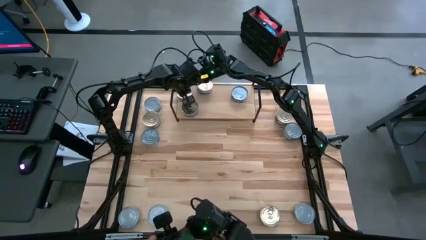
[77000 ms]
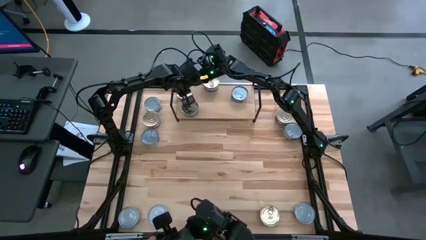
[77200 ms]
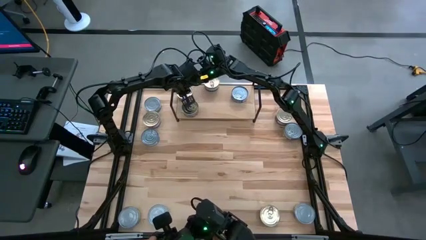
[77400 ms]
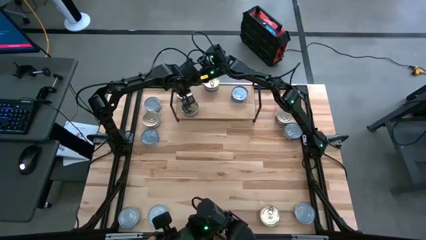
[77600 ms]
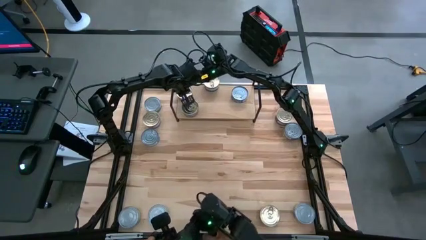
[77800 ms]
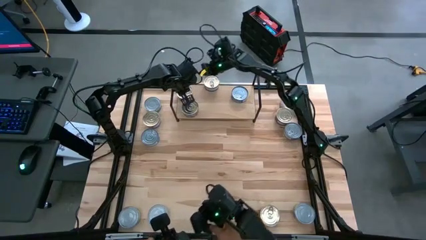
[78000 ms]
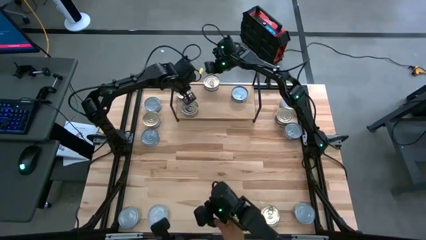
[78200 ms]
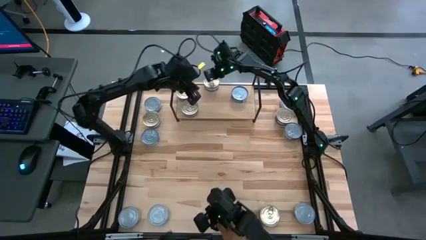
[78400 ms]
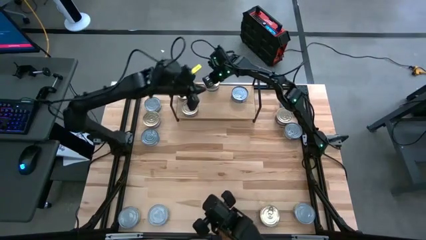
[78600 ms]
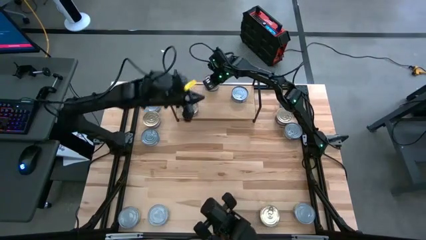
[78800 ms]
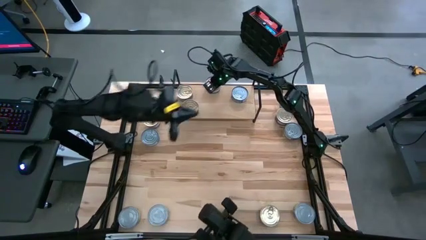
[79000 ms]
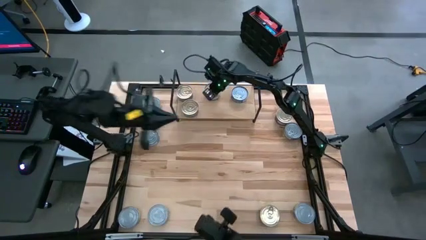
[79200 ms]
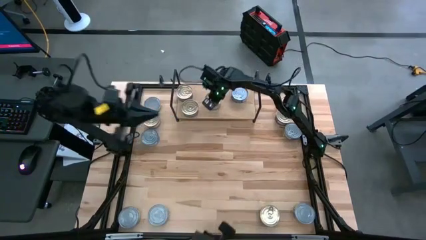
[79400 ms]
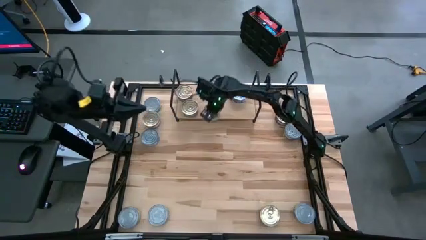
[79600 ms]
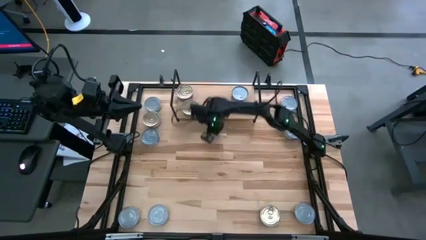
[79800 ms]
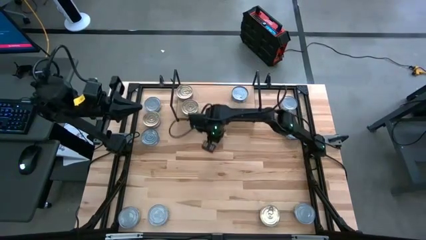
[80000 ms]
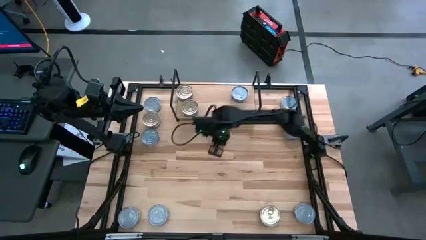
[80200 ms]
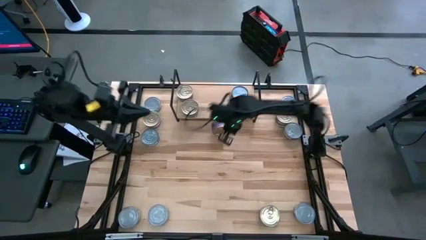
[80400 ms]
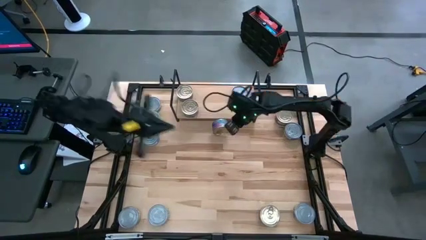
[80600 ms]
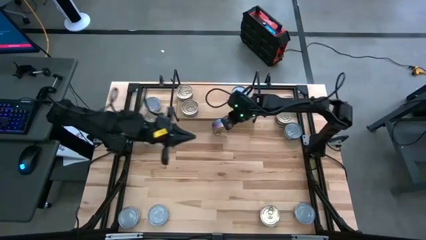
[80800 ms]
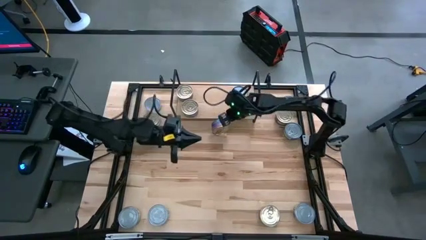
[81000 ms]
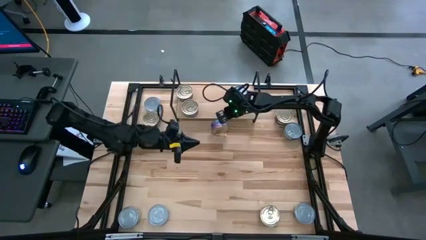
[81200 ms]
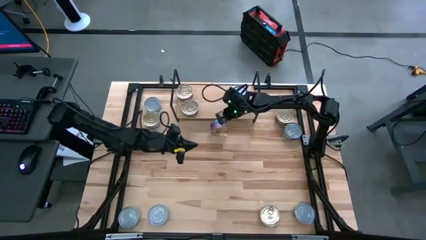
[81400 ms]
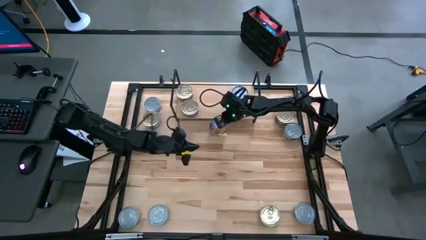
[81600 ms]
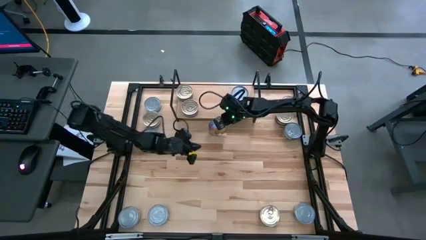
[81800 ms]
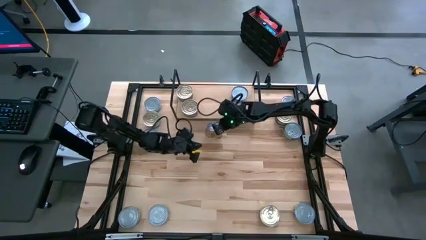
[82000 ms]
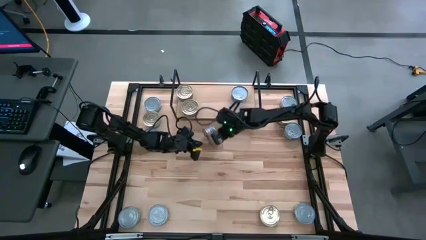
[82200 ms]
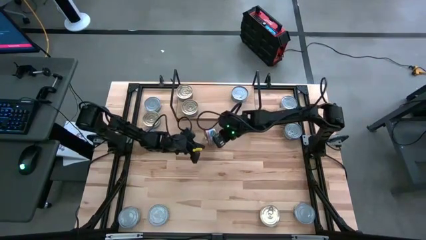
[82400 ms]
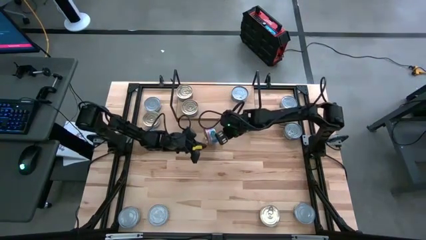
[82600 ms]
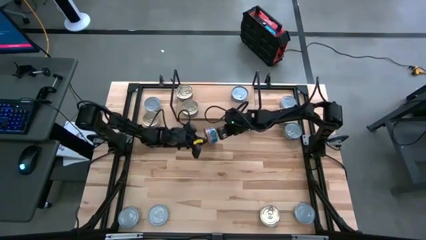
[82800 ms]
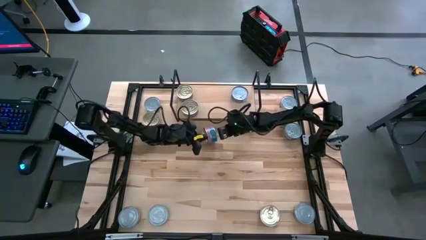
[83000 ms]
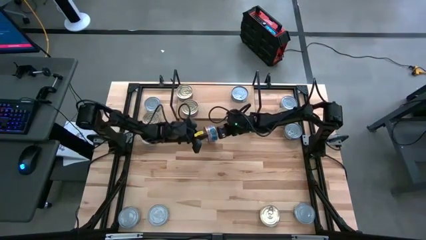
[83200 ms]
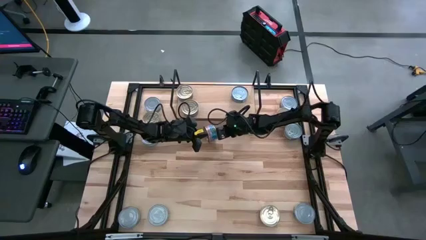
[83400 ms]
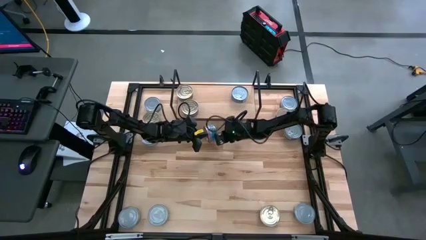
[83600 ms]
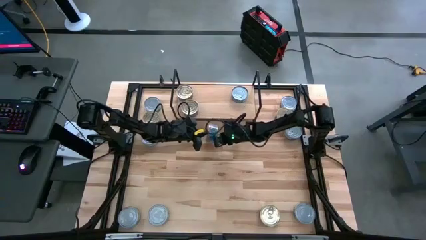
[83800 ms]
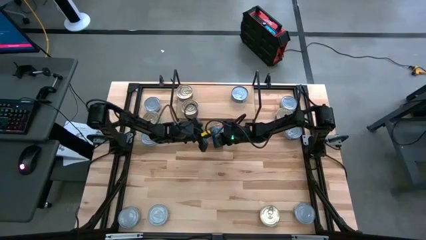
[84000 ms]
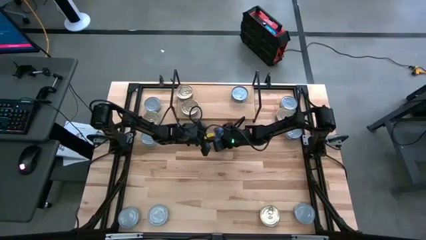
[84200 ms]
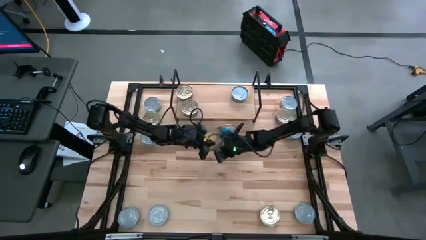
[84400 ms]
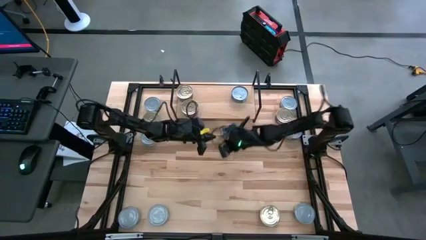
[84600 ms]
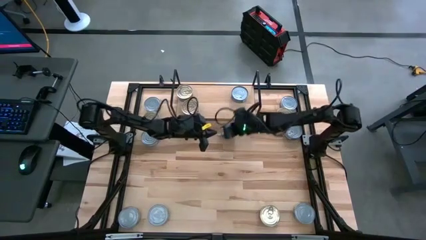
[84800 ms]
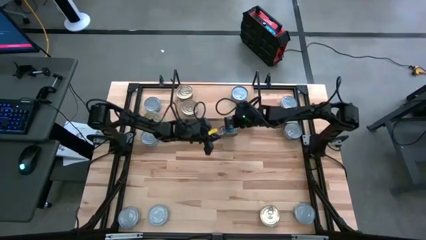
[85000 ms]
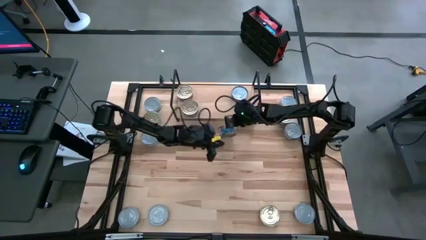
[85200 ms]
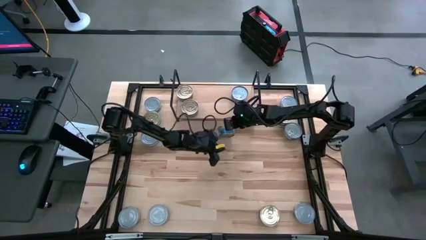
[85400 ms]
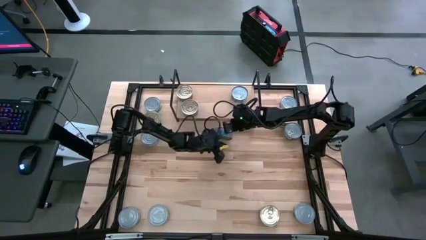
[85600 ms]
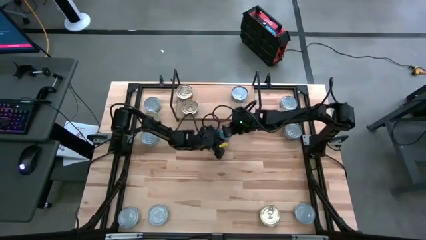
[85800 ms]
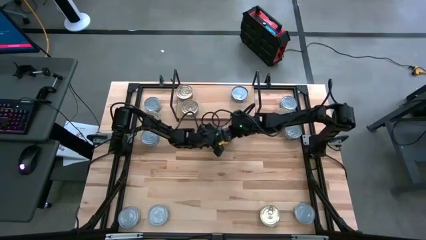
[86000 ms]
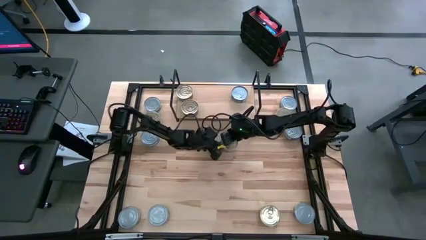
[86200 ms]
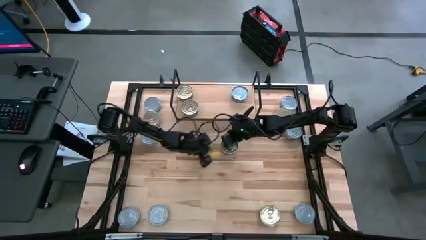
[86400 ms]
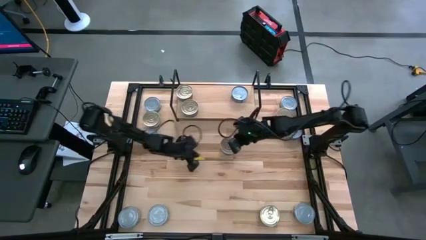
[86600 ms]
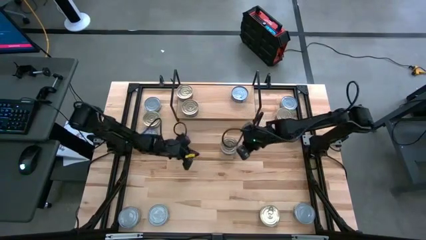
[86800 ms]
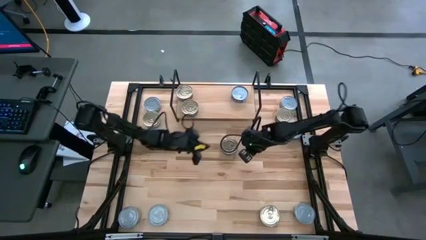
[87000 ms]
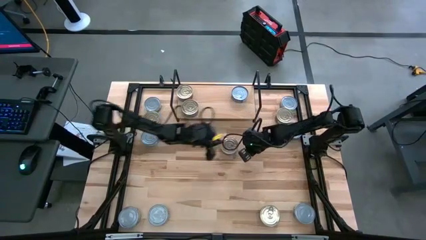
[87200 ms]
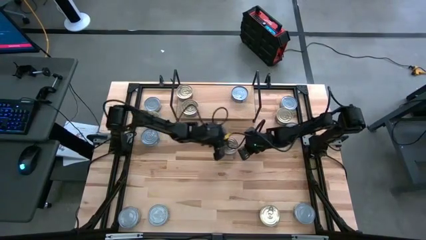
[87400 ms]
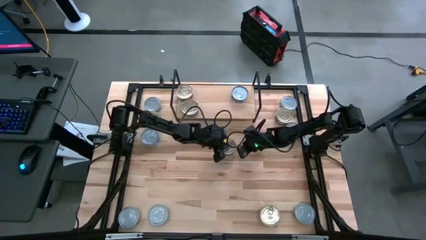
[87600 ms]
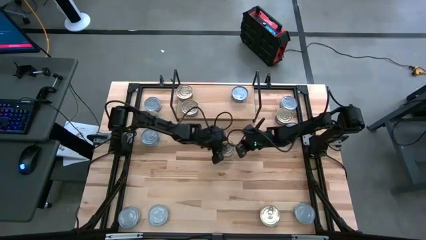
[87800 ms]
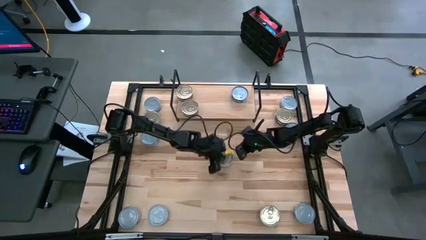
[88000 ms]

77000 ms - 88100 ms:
Task: Stack canned seafood by type on shelf
Stack the blue pink tuna can on top of the other blue pink tuna can on the shelf

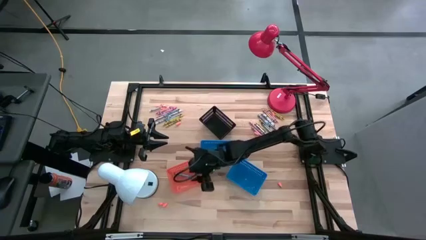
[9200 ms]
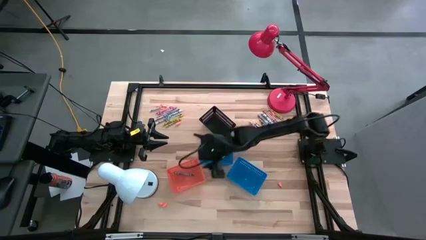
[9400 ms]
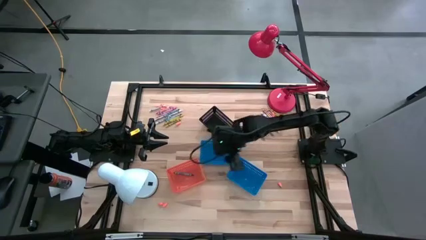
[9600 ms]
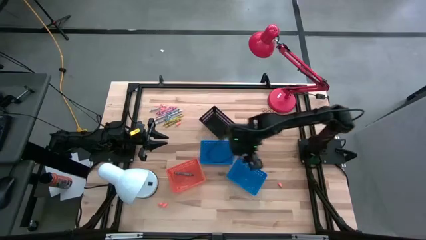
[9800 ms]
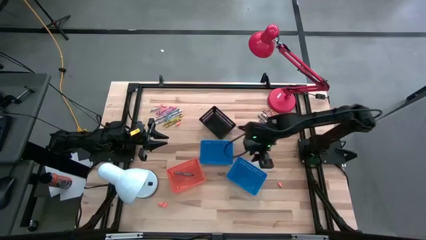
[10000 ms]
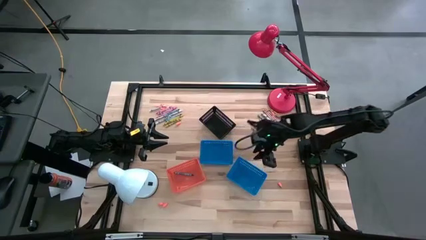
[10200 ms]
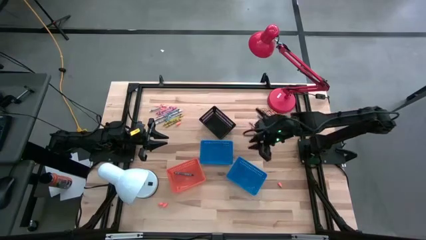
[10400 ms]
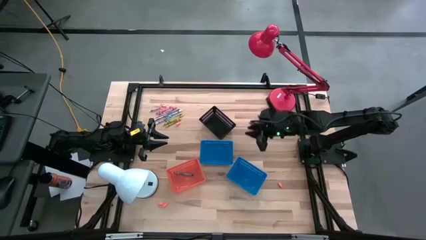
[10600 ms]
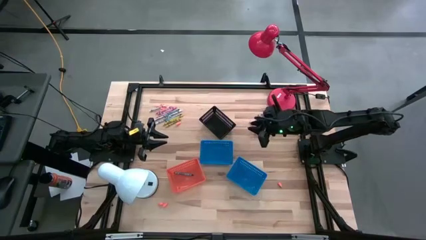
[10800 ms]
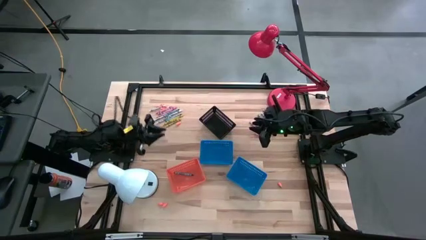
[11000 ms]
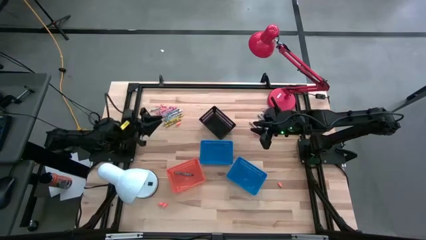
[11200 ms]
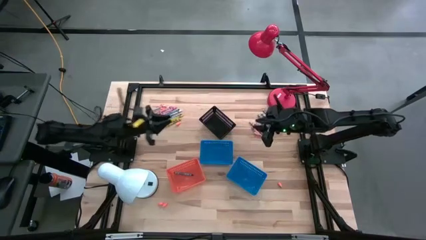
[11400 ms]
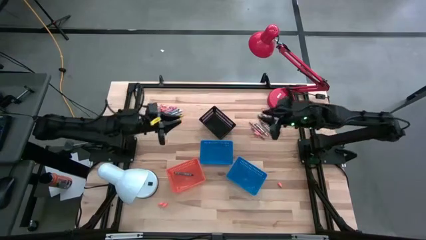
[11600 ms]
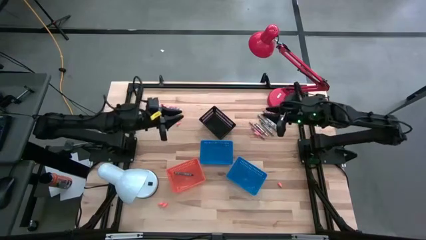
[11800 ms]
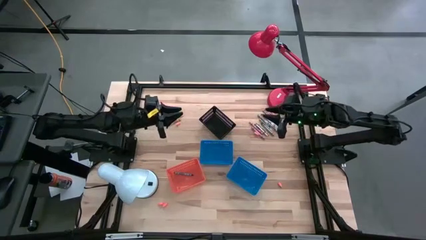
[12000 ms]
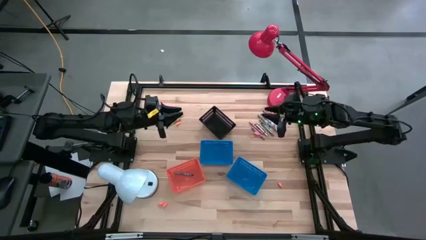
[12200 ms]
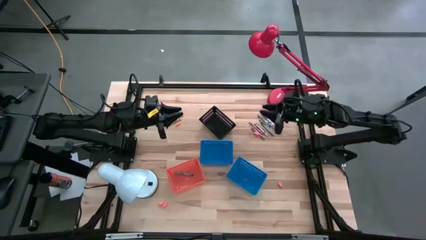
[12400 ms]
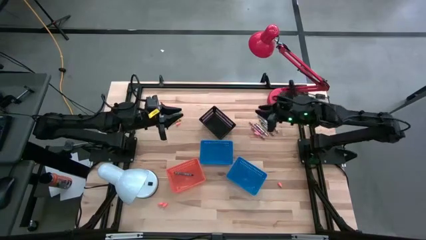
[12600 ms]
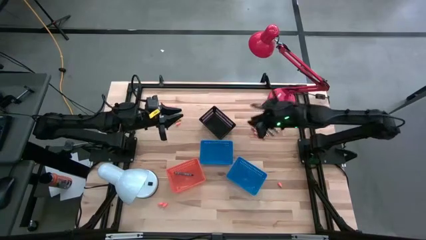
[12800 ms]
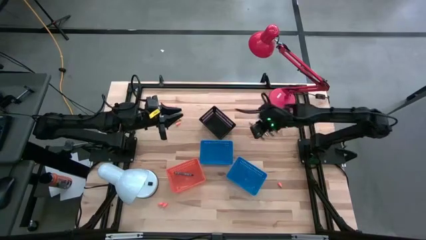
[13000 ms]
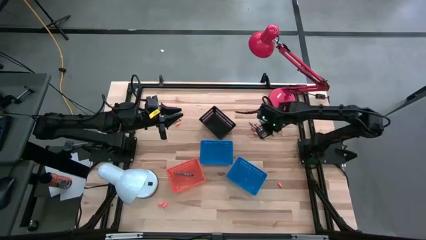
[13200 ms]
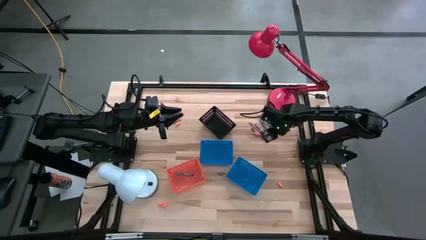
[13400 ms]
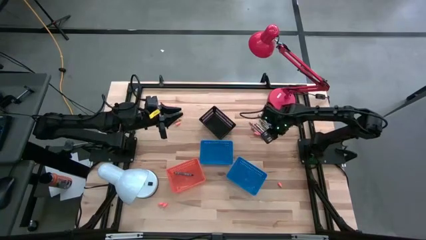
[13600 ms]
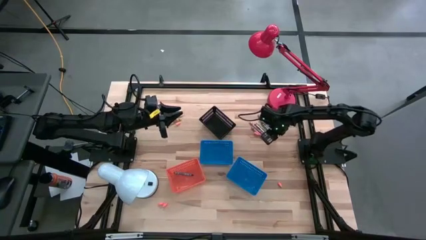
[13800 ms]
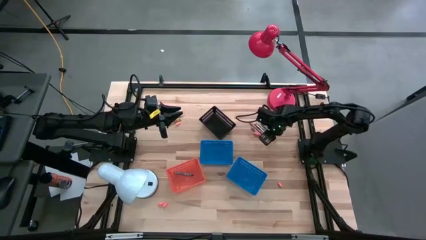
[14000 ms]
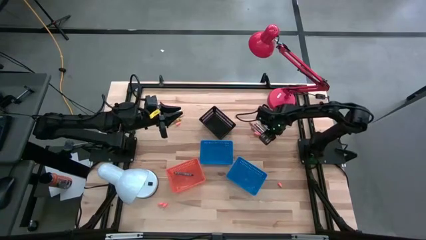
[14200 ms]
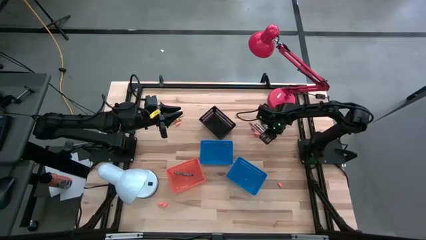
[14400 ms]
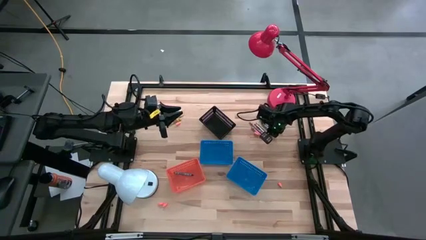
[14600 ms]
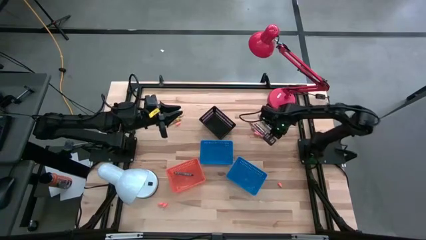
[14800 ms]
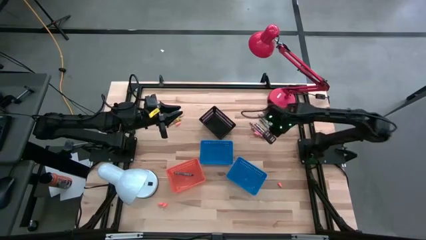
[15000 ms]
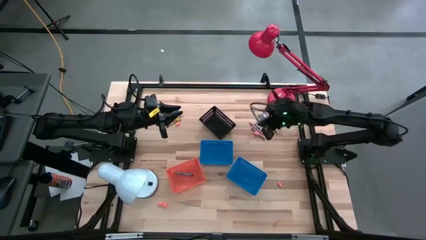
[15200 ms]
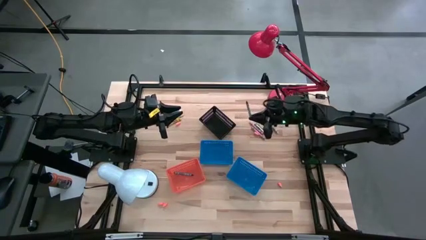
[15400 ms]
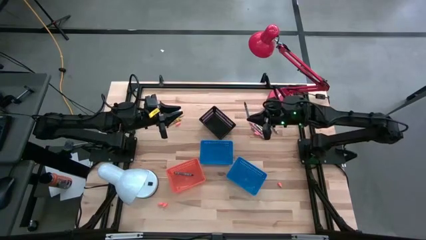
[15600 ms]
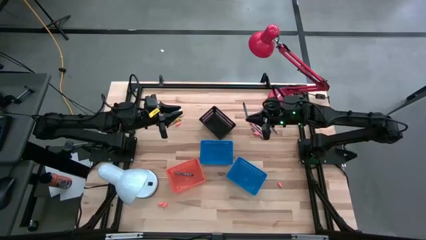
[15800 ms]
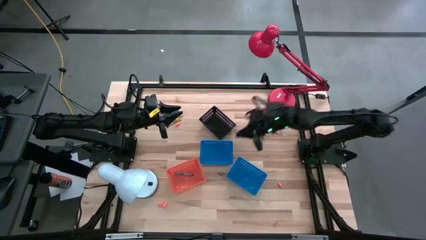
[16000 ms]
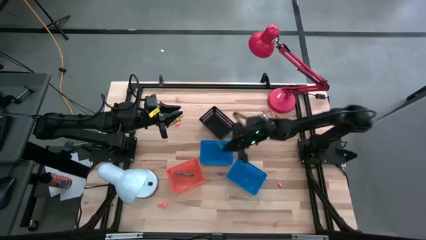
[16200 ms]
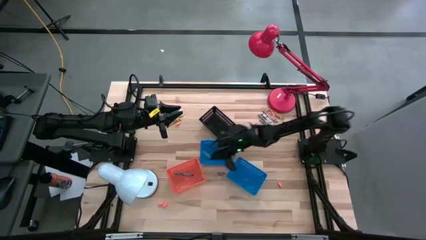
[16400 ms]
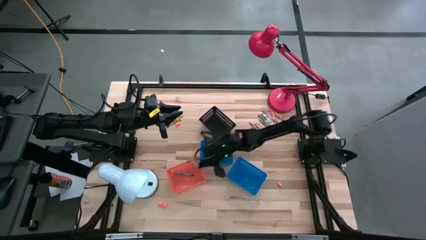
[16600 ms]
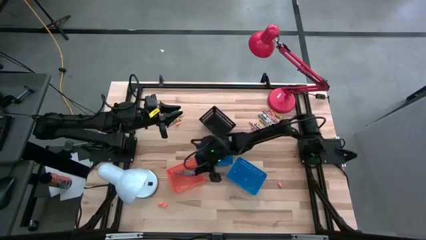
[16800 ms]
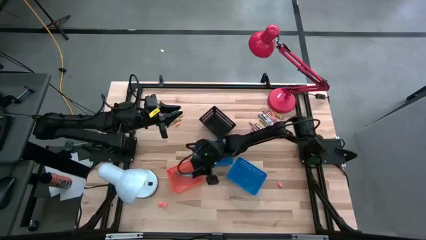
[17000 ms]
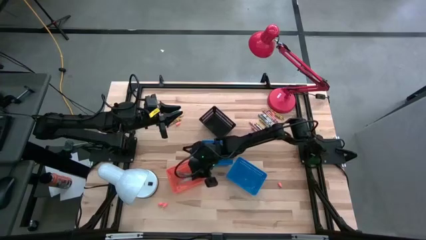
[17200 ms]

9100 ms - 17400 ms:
Task: Sort crayons
Put the blue/green crayon into the orange bin
